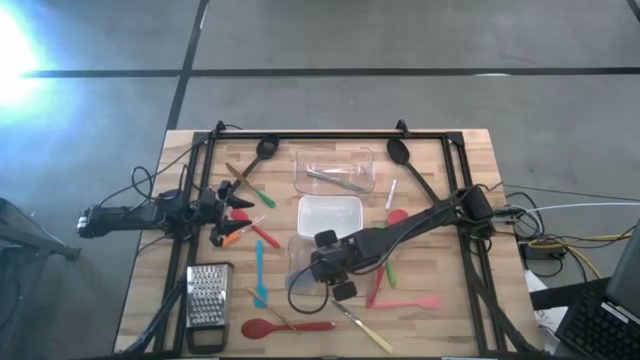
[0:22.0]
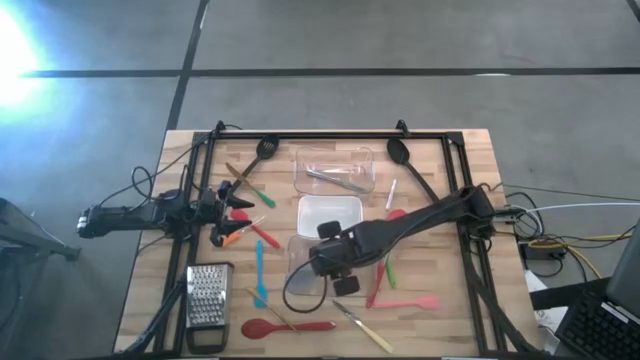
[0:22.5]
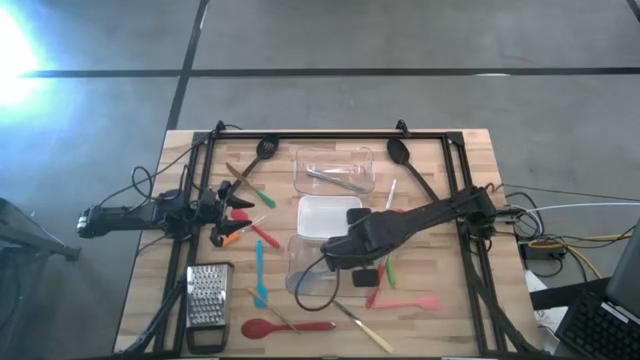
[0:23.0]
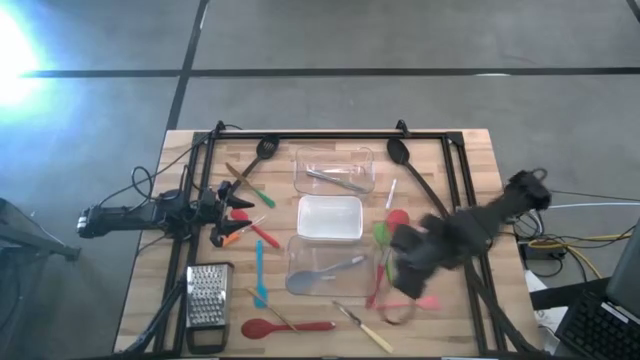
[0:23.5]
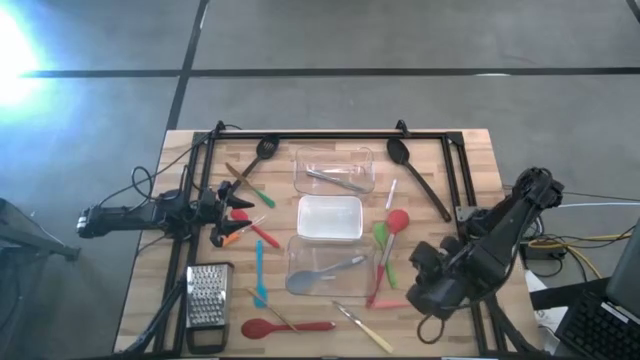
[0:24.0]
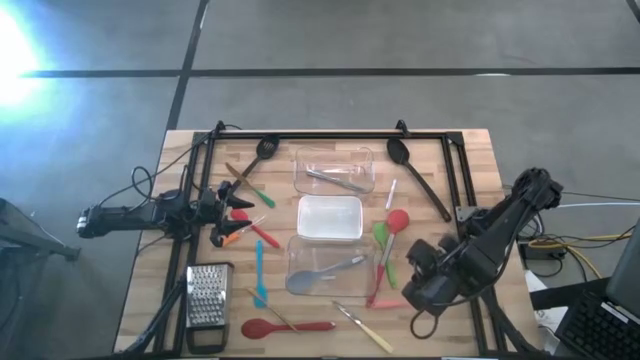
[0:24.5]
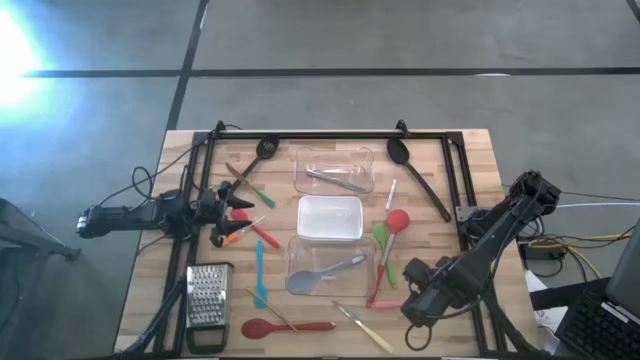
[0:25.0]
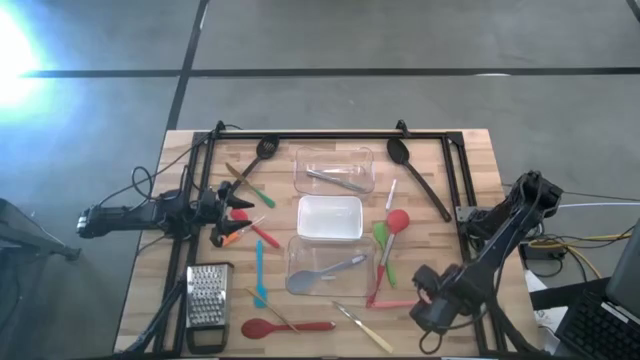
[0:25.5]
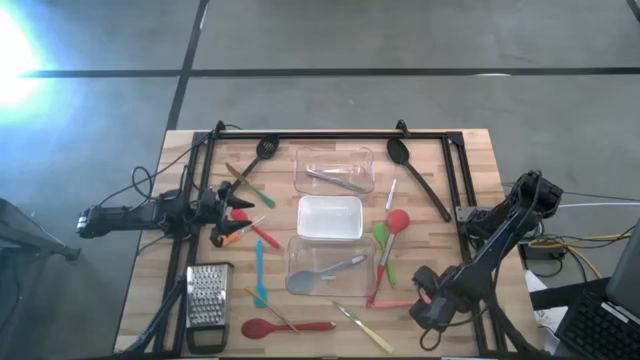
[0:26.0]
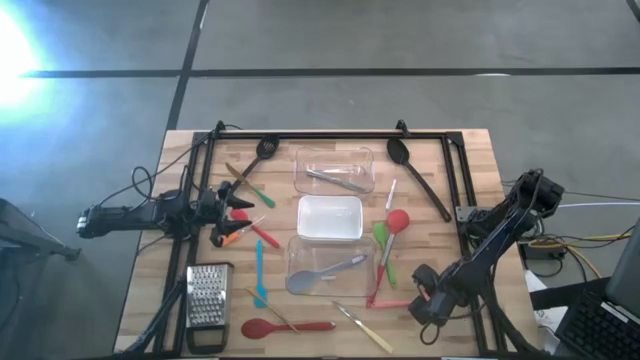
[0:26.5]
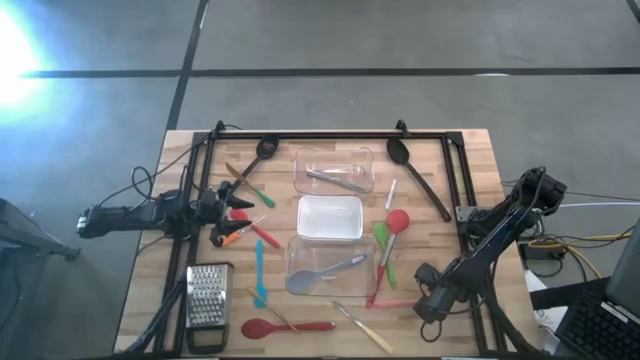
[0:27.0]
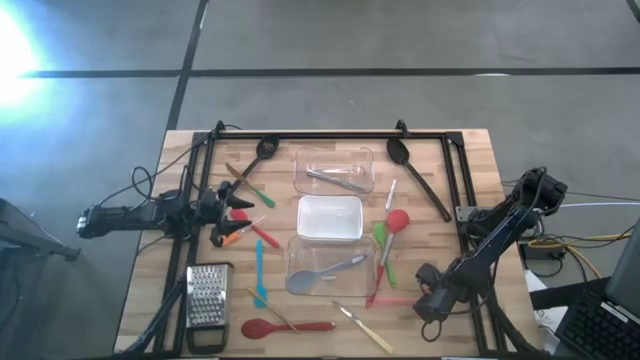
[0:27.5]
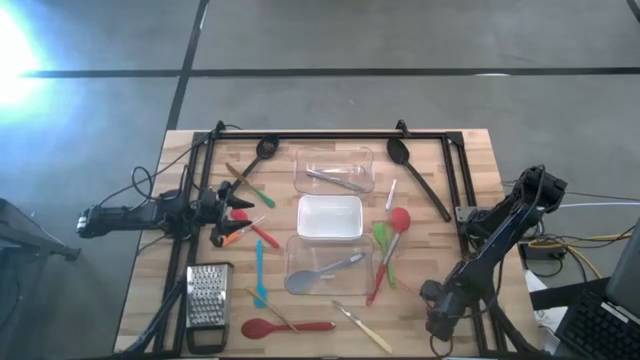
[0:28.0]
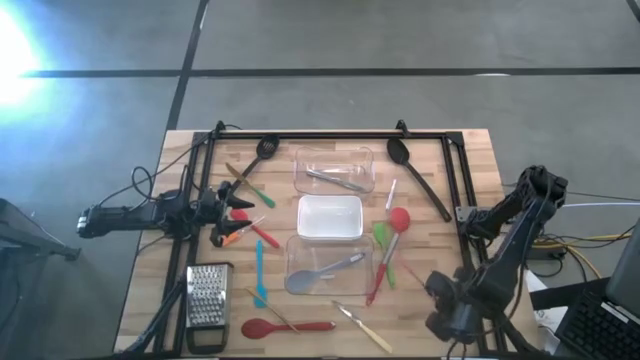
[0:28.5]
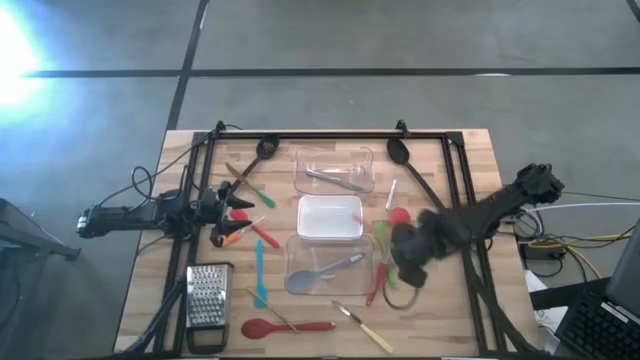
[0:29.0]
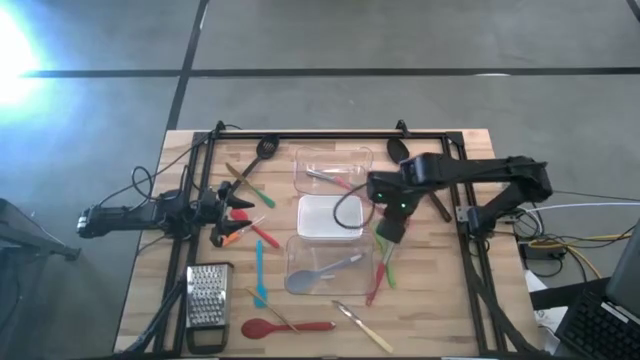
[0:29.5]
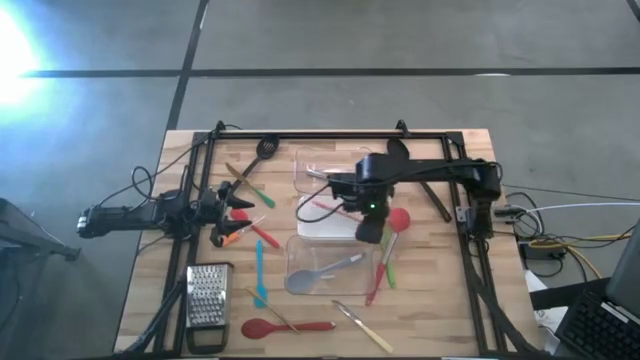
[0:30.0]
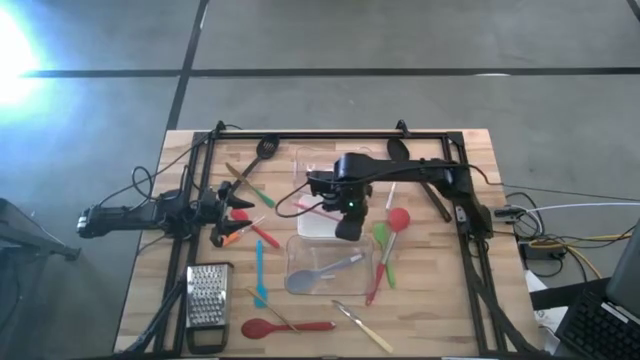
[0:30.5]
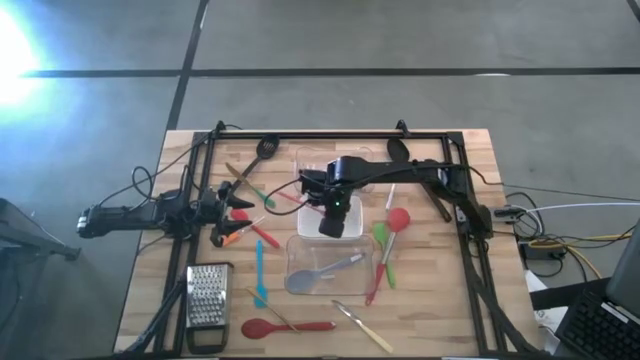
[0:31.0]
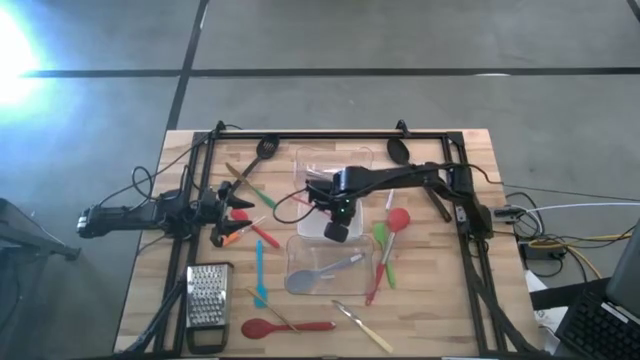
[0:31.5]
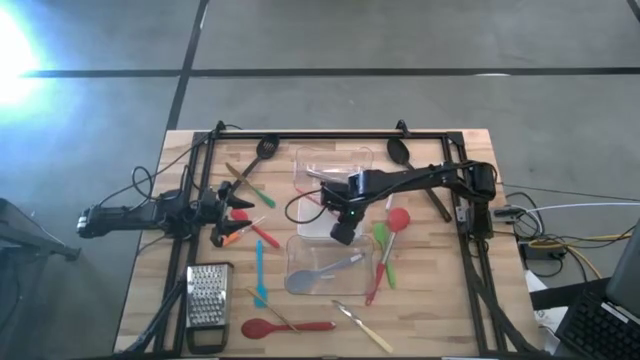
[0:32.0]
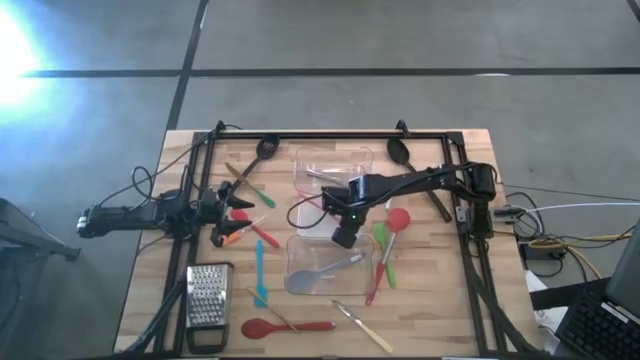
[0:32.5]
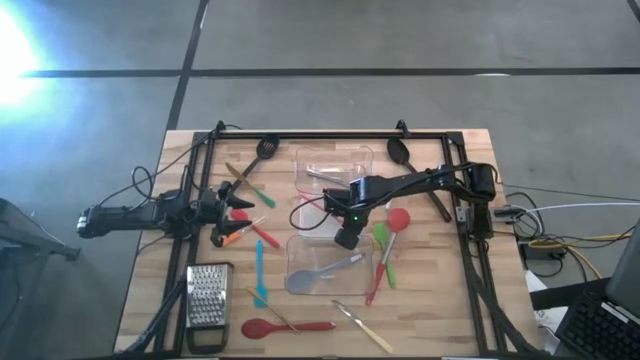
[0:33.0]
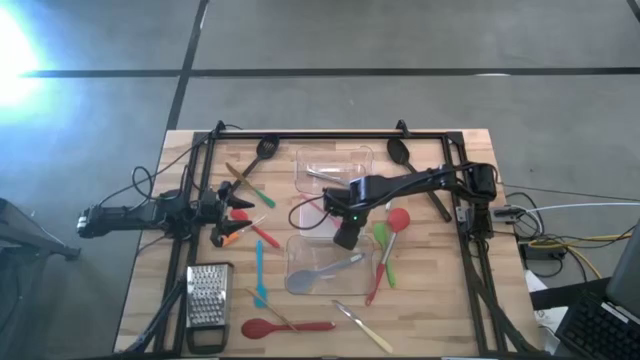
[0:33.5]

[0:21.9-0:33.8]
Task: Pick & Place Kitchen Items
Put the pink spatula into the white bin

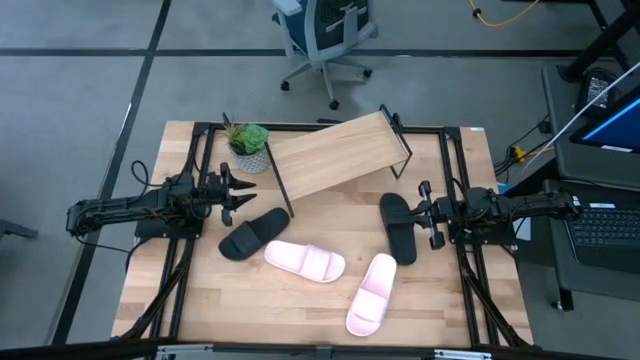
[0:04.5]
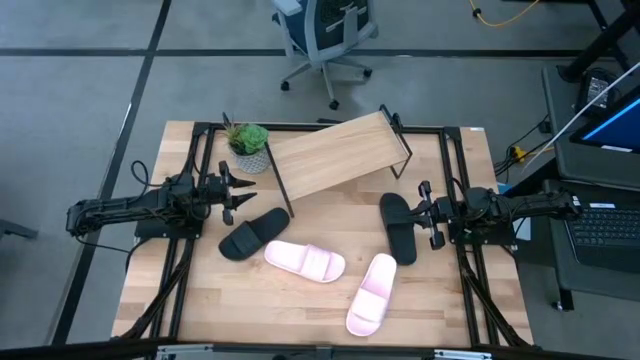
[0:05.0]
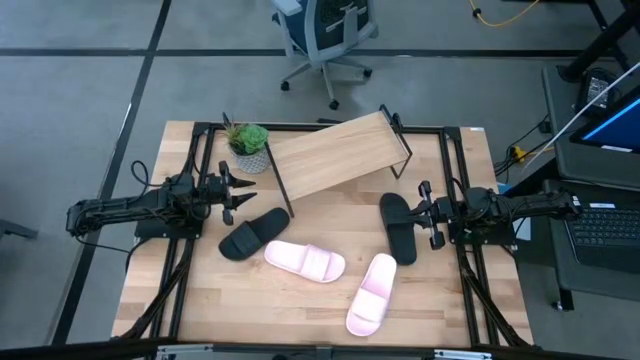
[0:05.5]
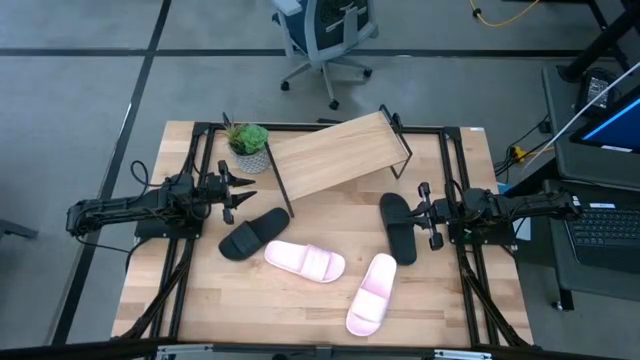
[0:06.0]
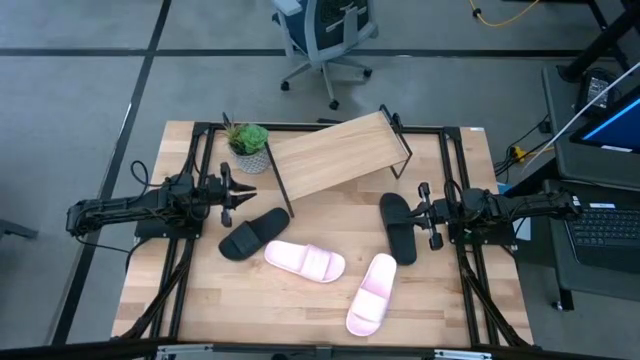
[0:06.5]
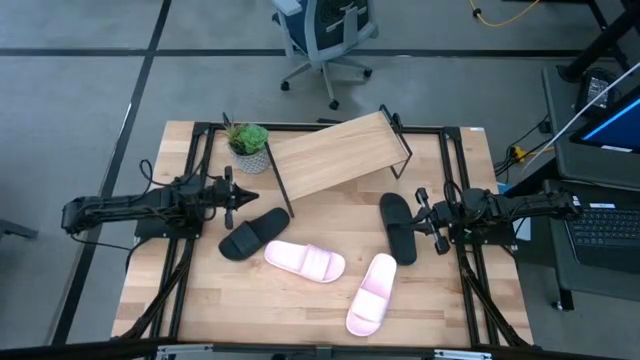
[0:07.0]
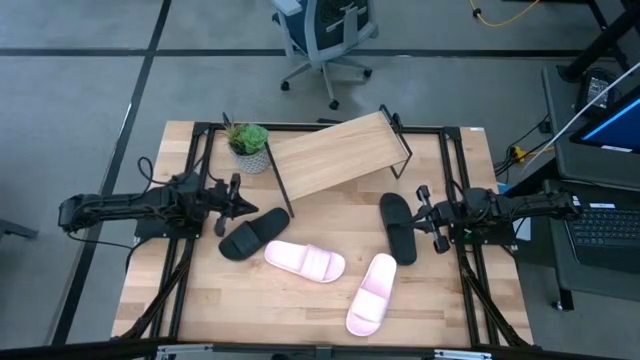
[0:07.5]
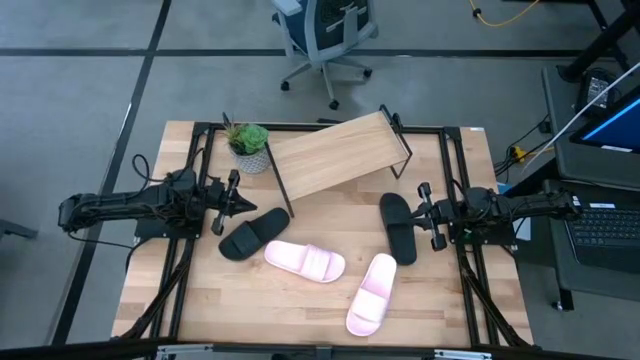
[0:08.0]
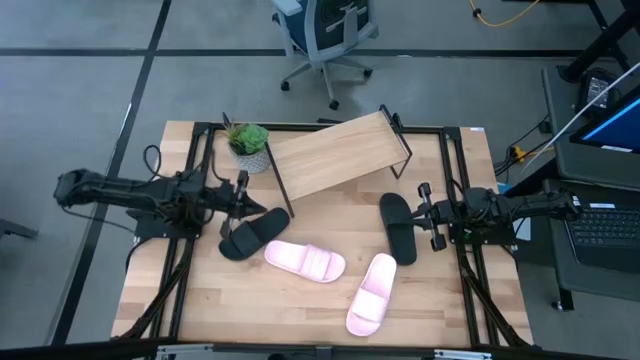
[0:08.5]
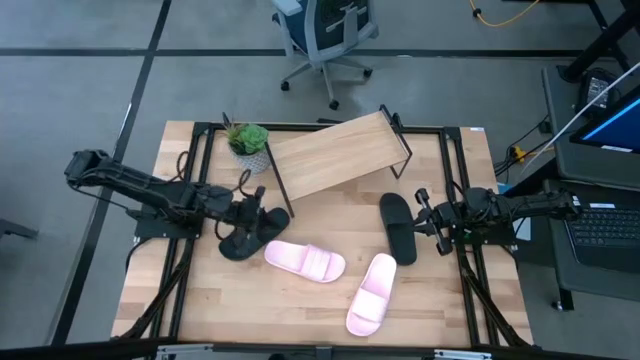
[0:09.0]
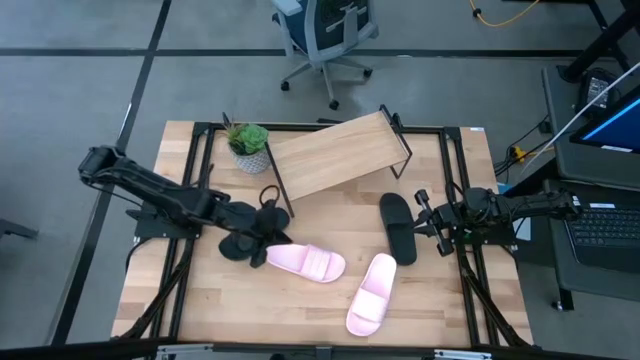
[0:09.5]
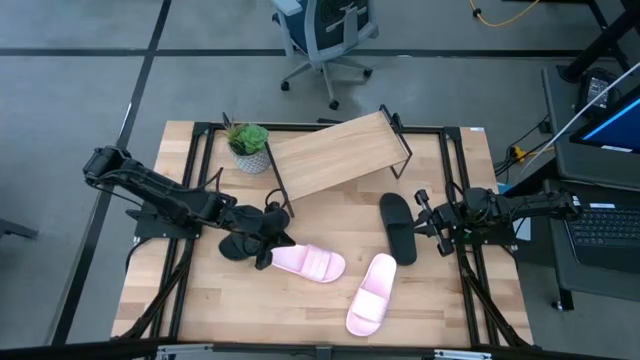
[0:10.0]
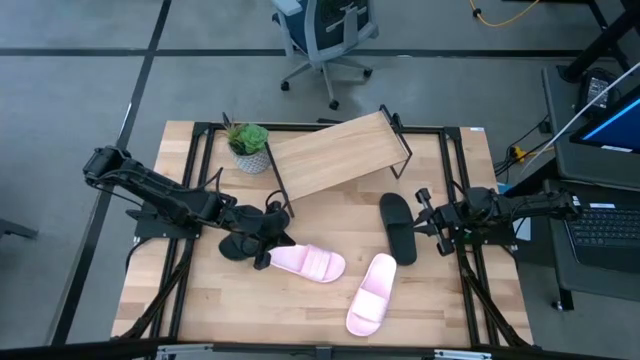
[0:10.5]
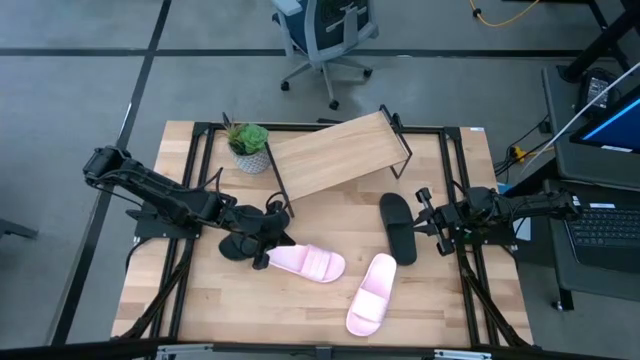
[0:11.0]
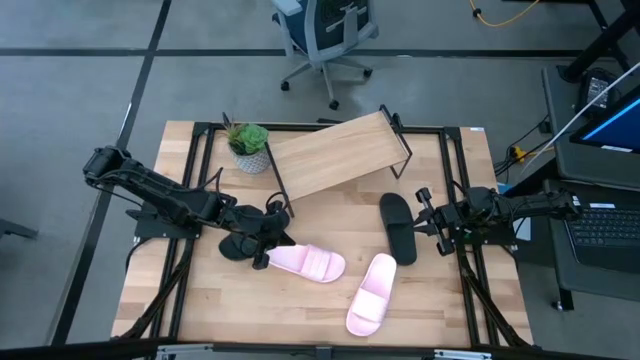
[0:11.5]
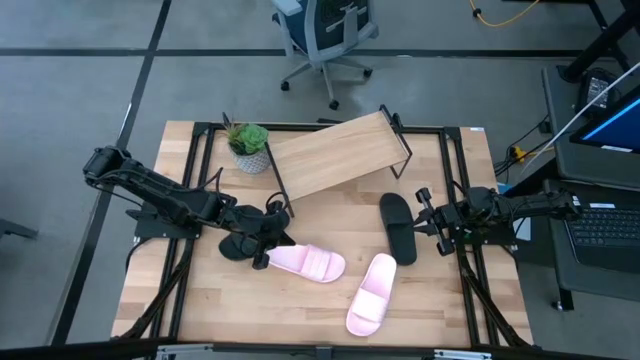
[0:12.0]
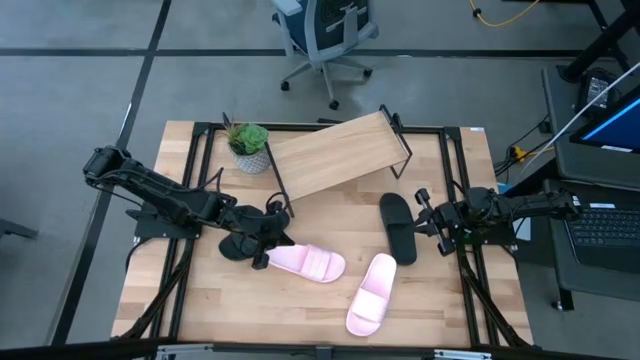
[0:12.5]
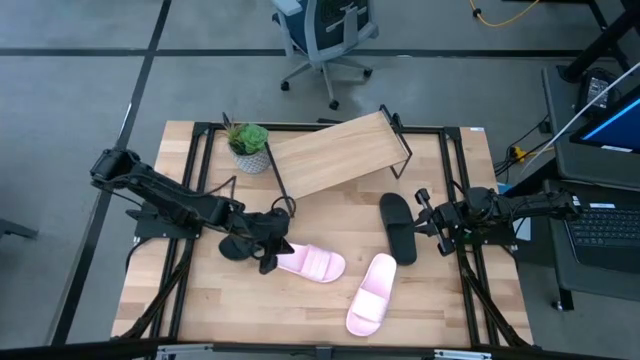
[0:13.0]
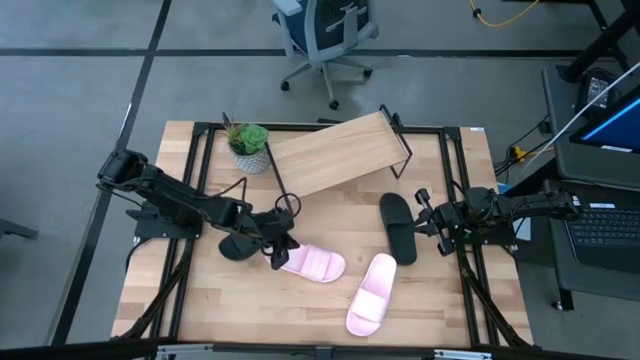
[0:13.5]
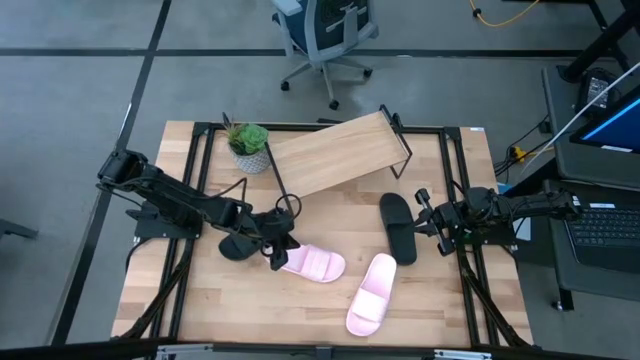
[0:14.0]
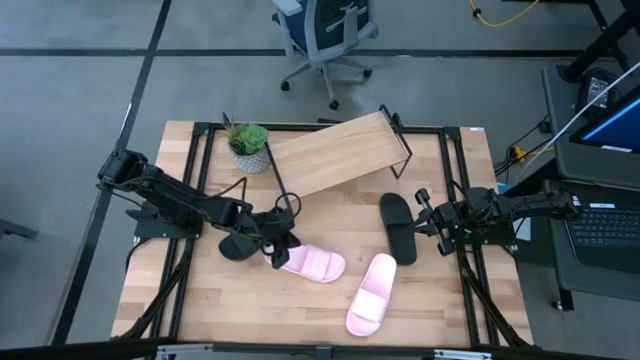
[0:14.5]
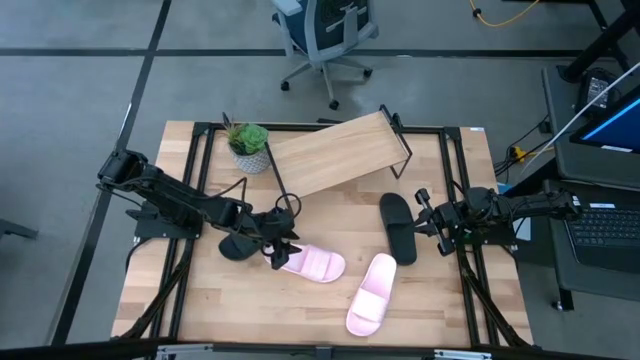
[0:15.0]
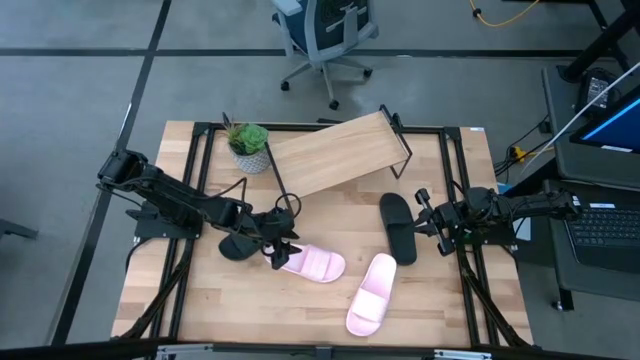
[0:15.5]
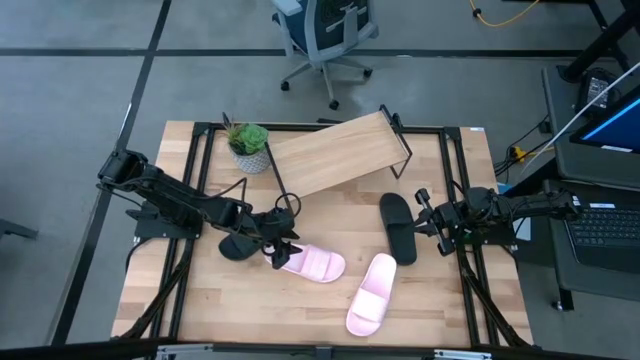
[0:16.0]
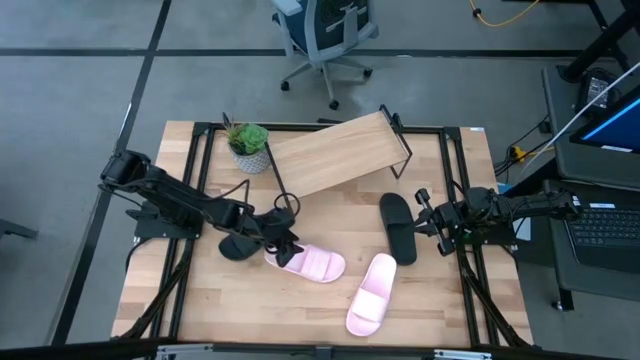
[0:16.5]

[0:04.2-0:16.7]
Task: Pick and place slides into the shelf
Put the left pink slide on the shelf
